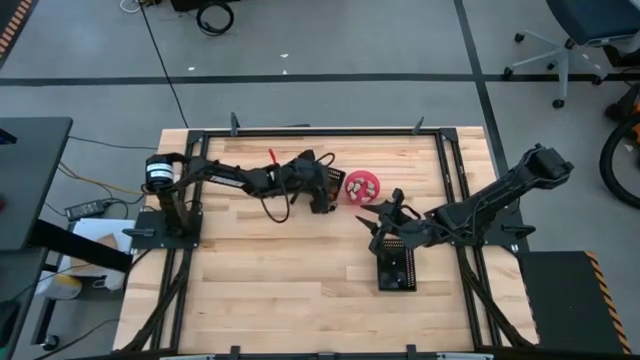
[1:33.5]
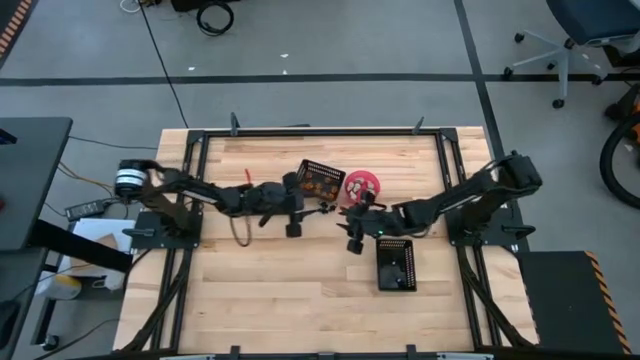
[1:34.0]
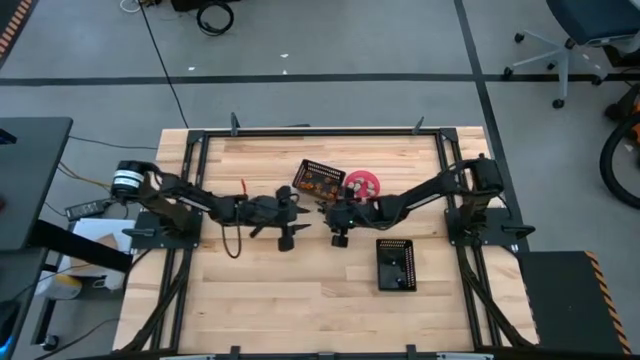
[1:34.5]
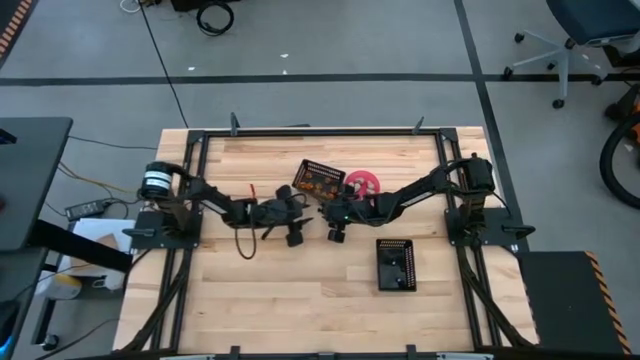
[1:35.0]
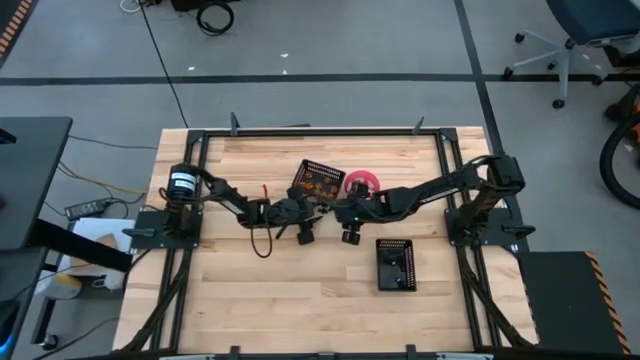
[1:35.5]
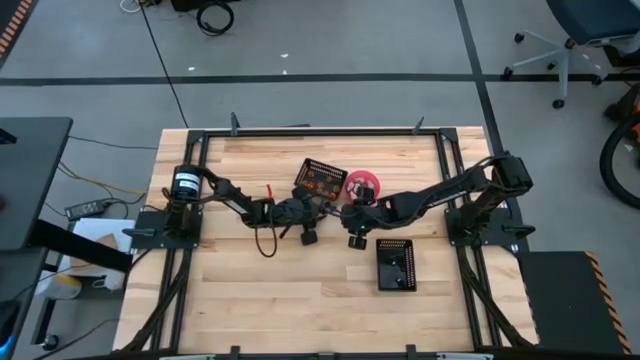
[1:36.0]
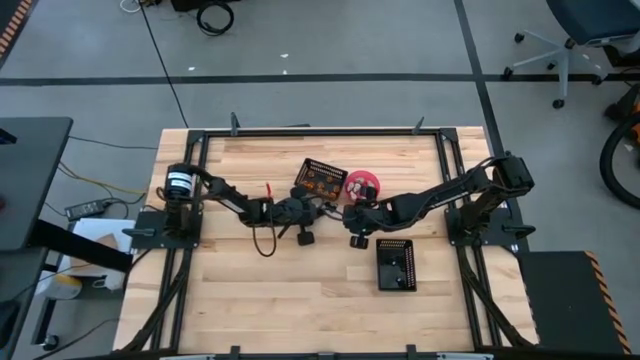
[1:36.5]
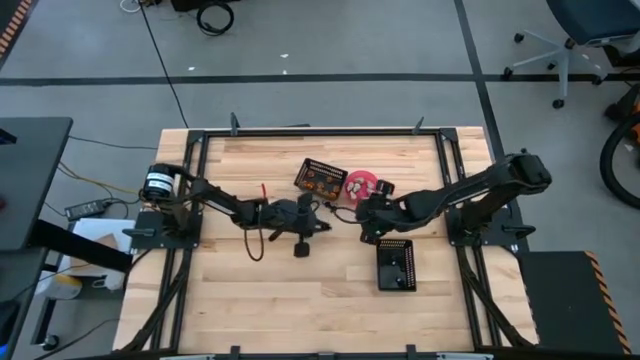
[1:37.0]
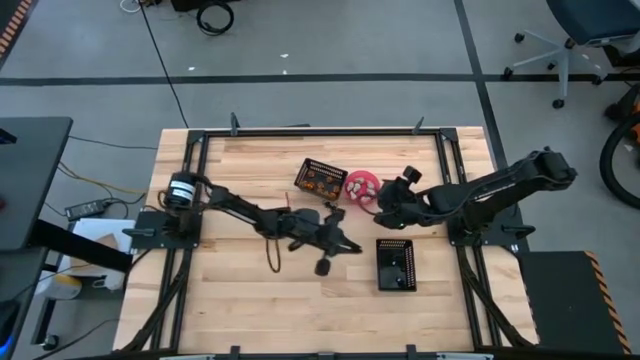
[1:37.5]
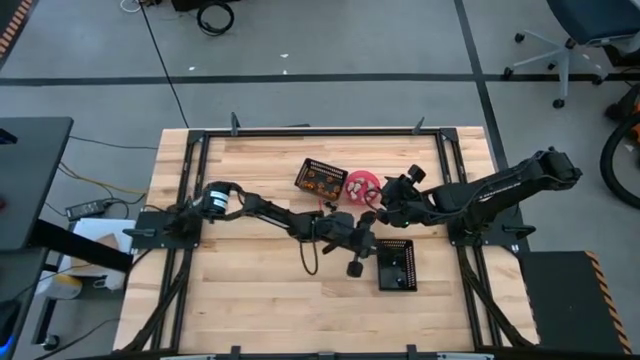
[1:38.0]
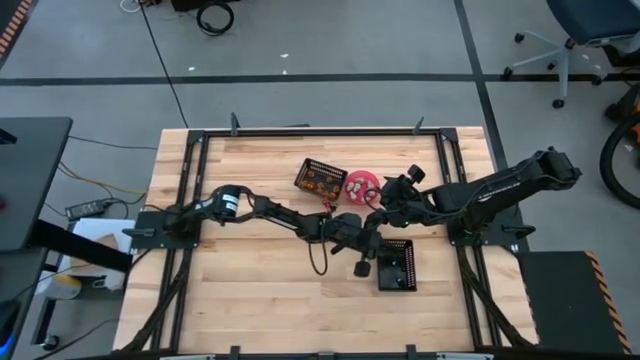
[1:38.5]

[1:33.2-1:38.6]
Task: Sort Halloween decoration
Put the black skeleton toy into the bottom black bin

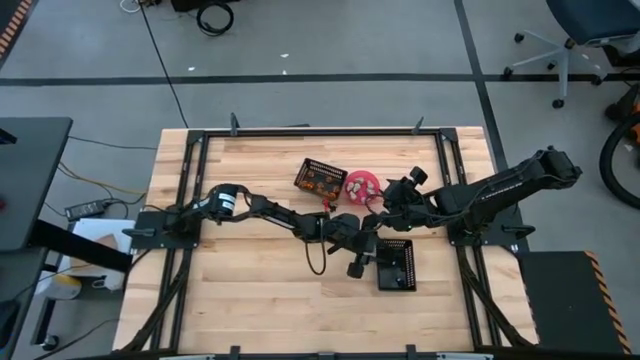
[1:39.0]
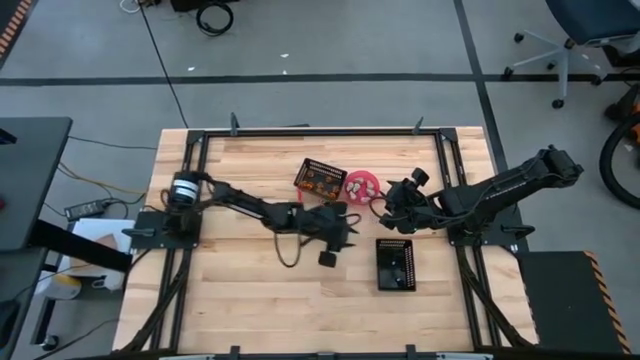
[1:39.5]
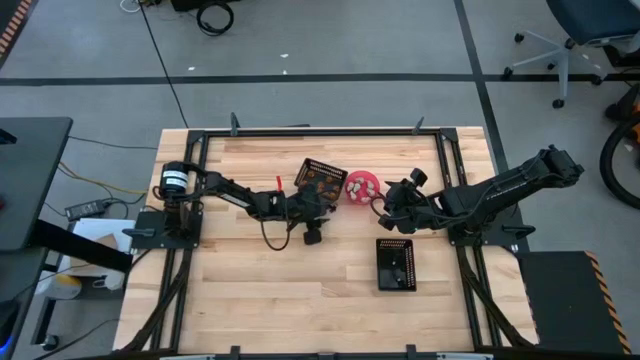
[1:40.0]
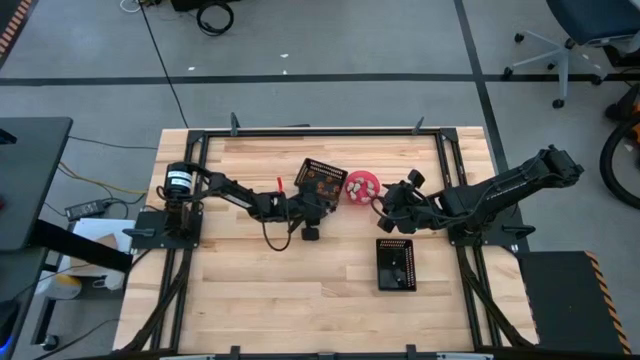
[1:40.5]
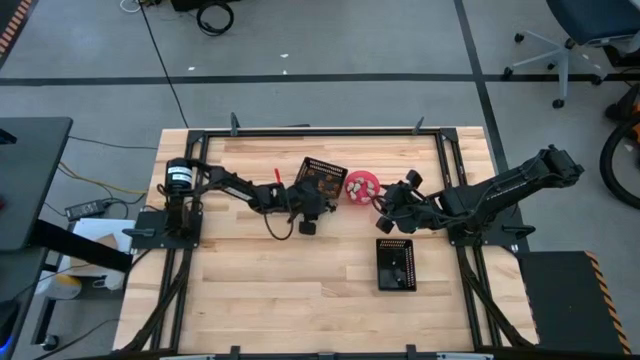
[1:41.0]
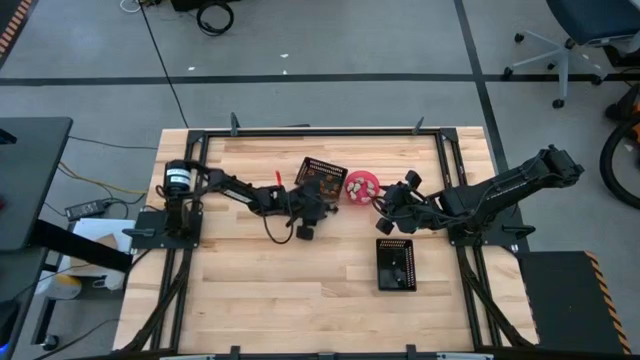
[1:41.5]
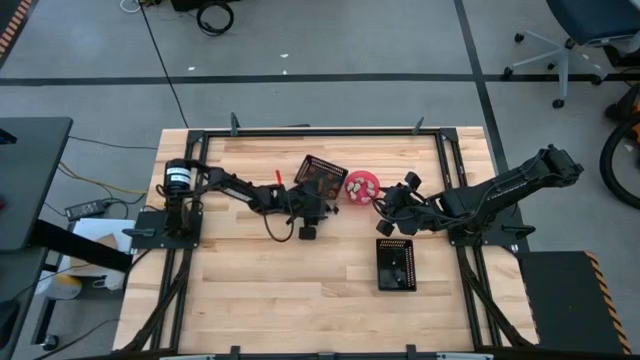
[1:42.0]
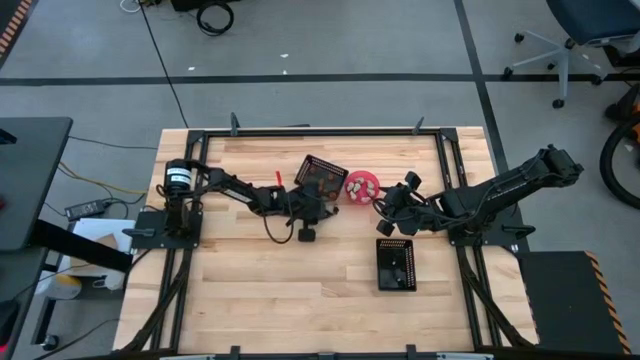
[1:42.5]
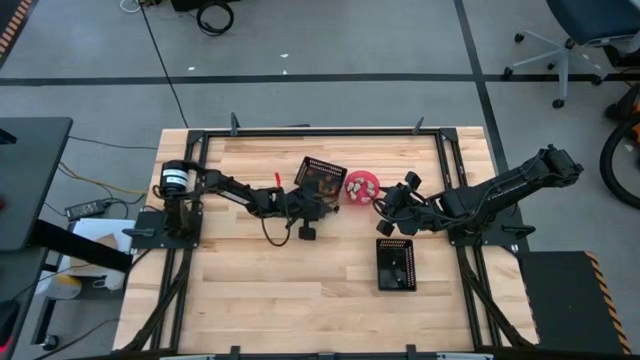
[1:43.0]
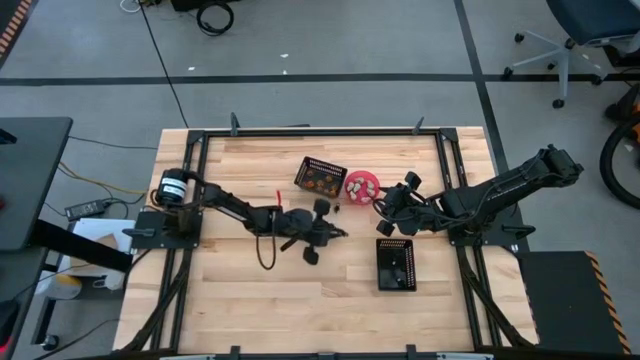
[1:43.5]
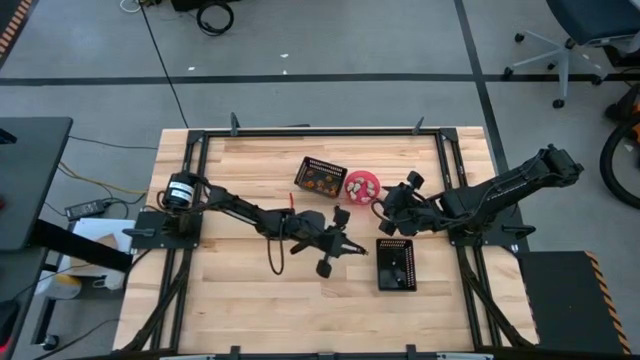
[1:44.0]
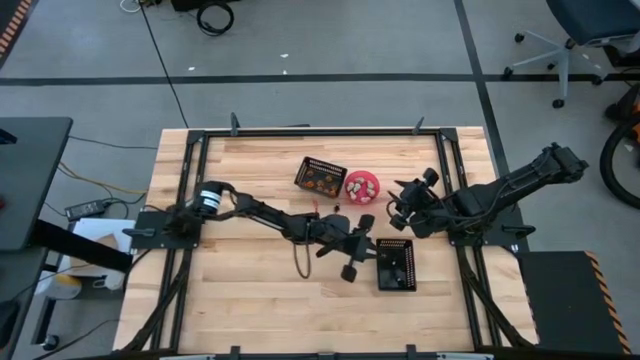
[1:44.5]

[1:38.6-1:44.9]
Put the black skeleton toy into the bottom black bin

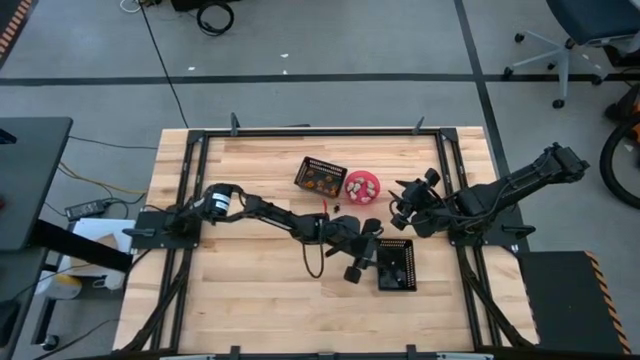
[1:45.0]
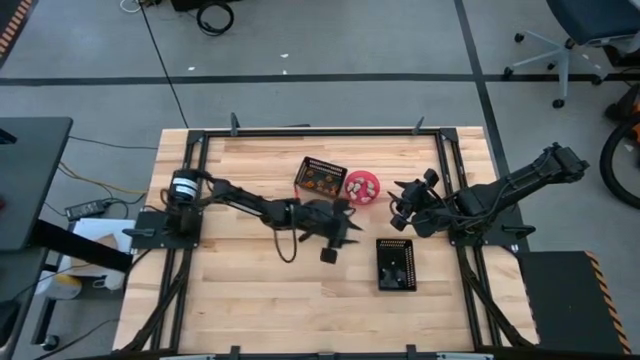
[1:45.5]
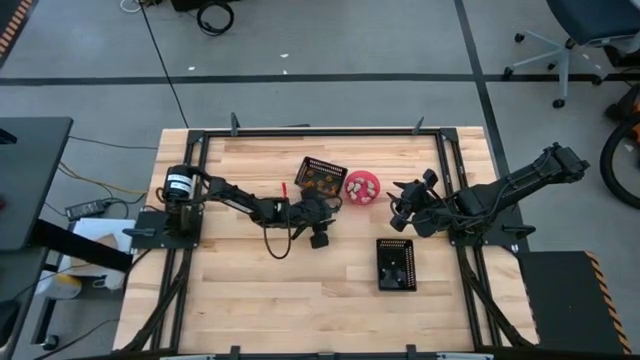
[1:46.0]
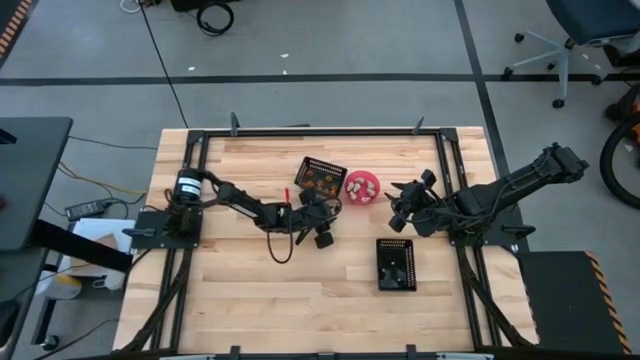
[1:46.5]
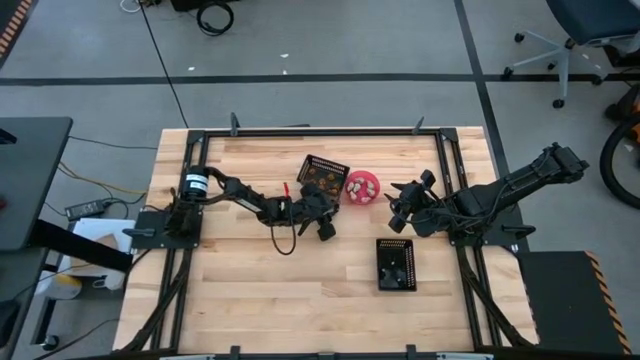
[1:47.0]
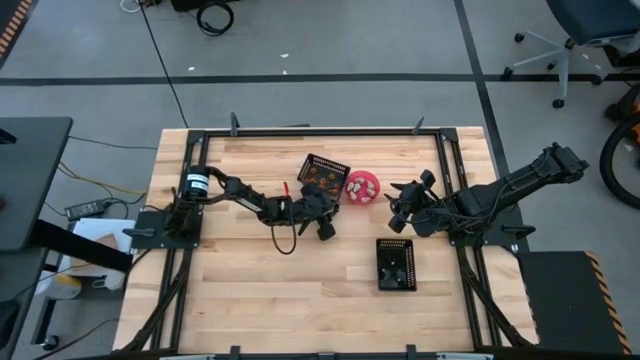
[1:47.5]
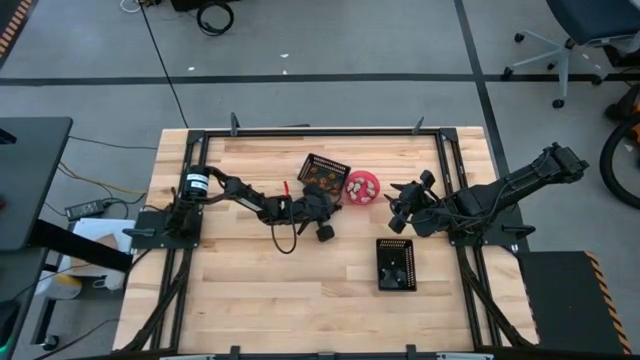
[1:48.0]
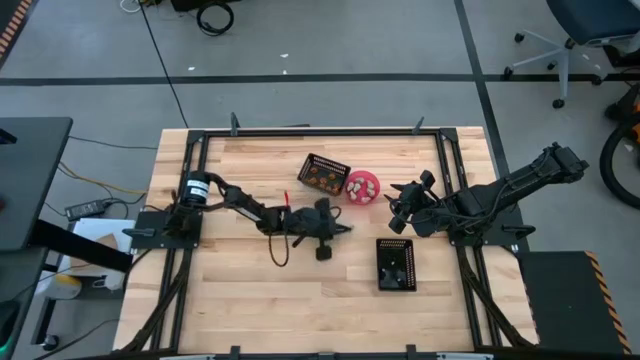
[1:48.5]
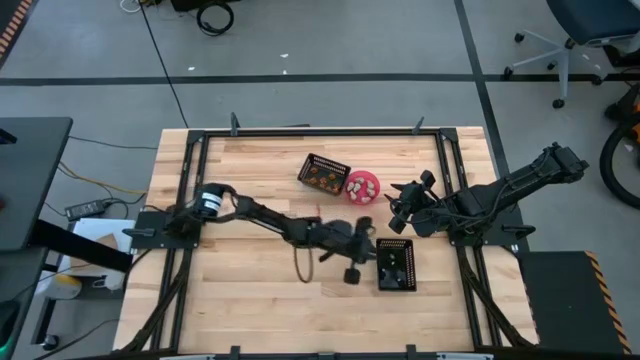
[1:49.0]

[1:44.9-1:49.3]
Put the black skeleton toy into the bottom black bin

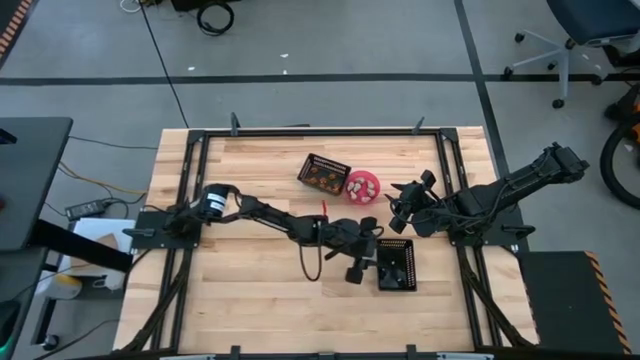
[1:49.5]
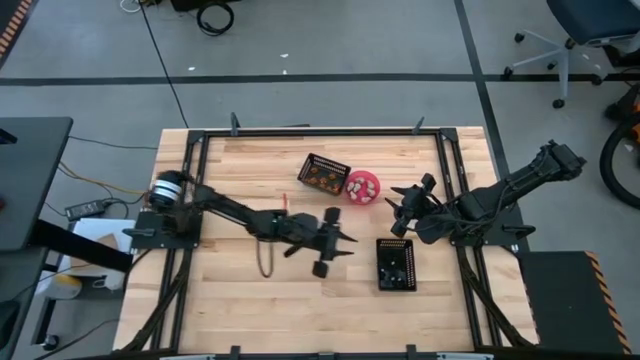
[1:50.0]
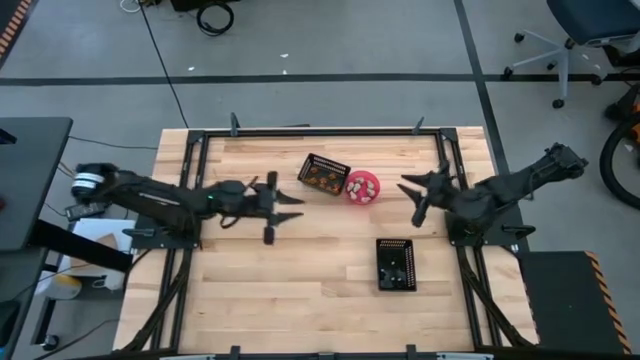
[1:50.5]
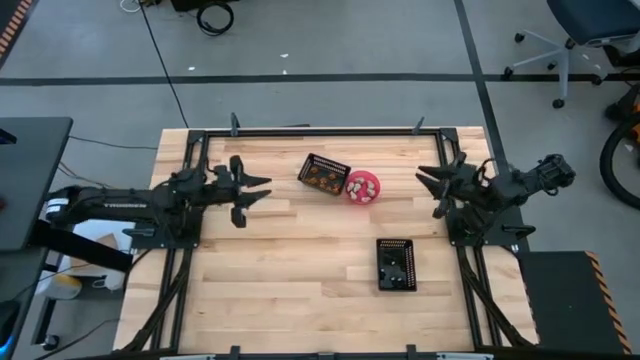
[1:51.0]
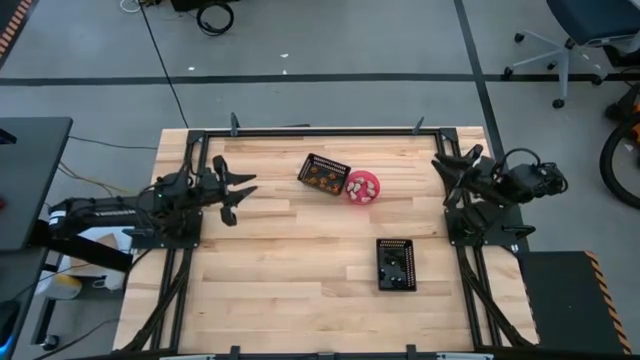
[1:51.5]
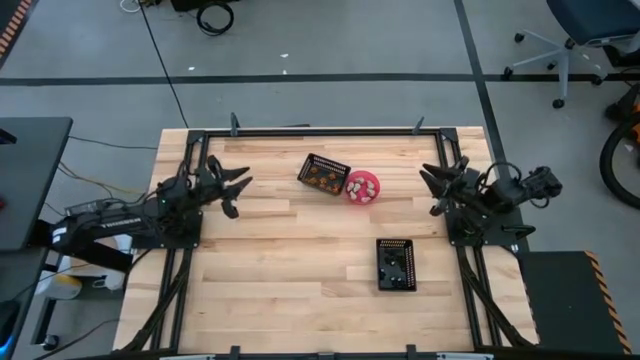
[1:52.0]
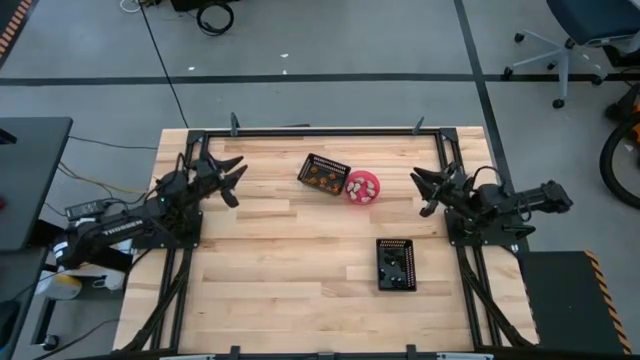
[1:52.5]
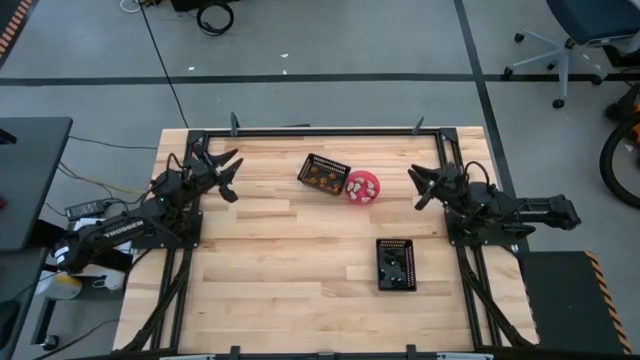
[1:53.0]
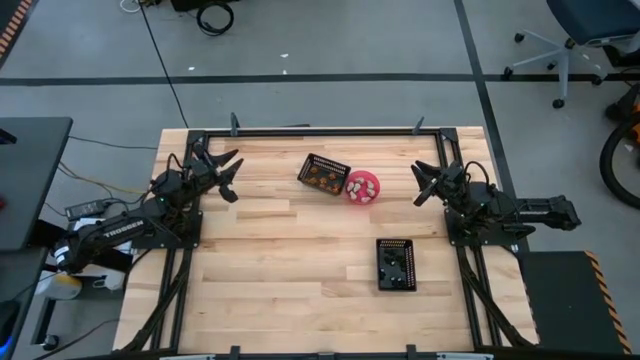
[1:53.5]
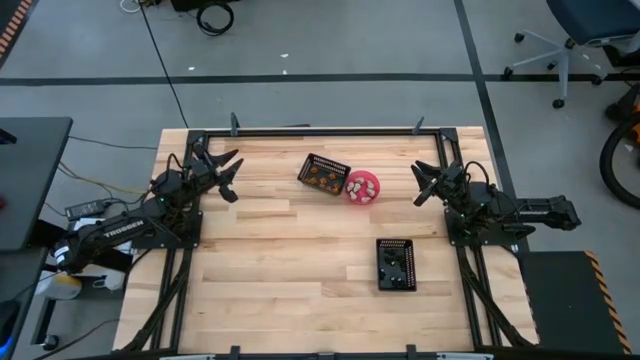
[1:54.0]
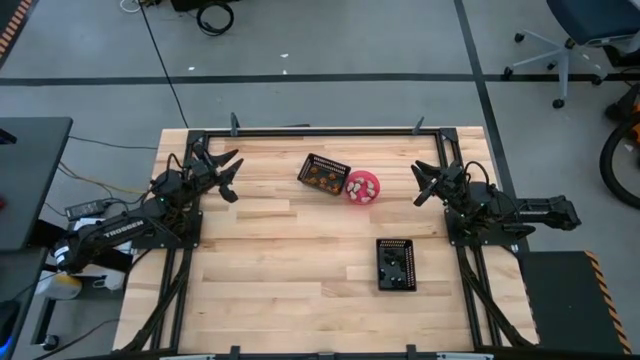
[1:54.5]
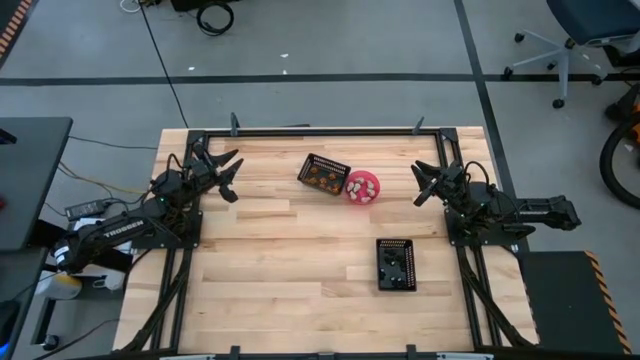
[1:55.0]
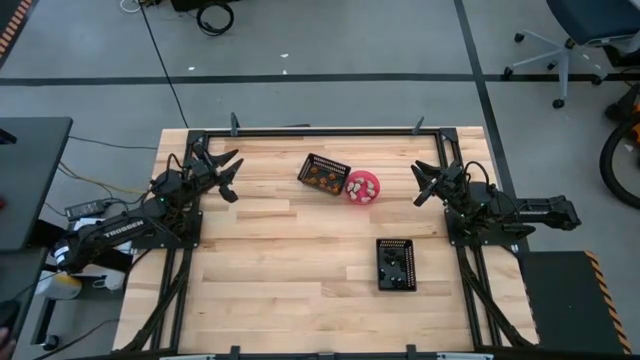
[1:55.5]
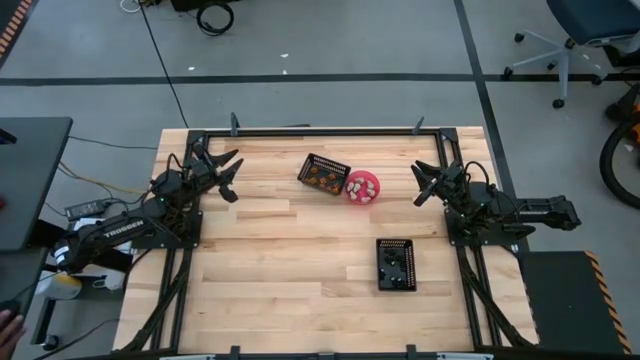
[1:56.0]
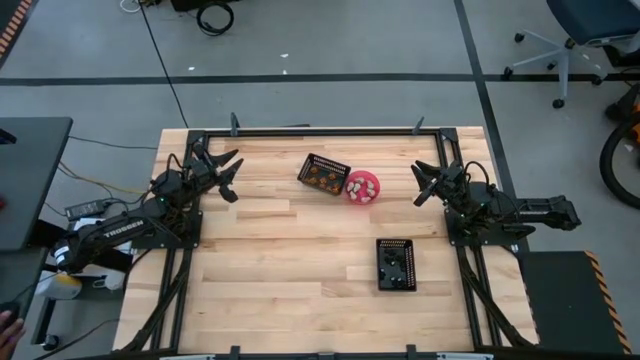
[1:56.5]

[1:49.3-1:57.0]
Return to Home Position
